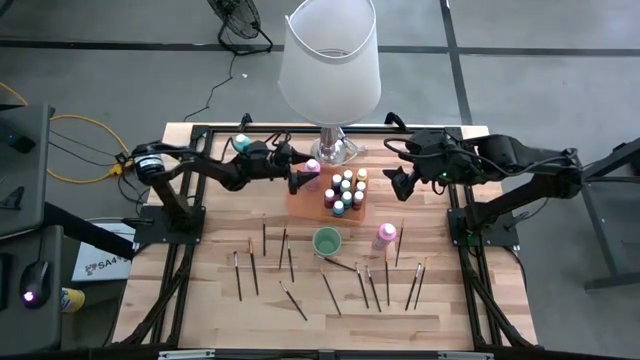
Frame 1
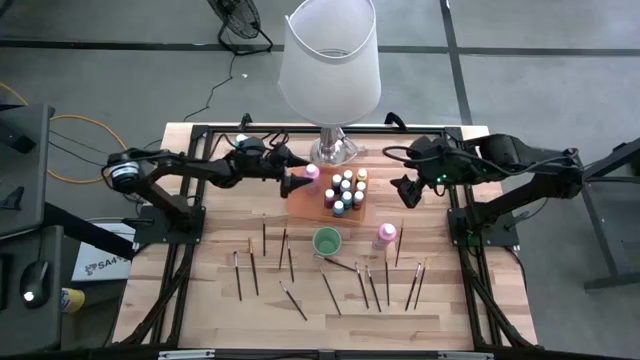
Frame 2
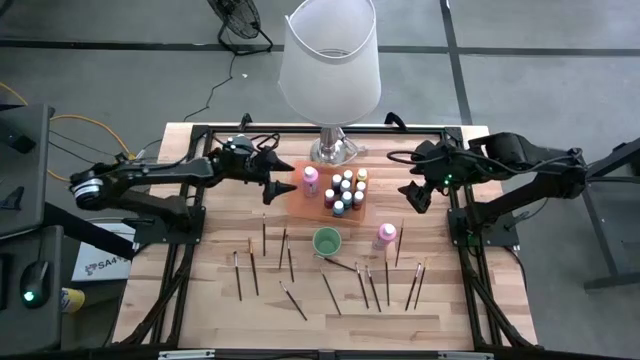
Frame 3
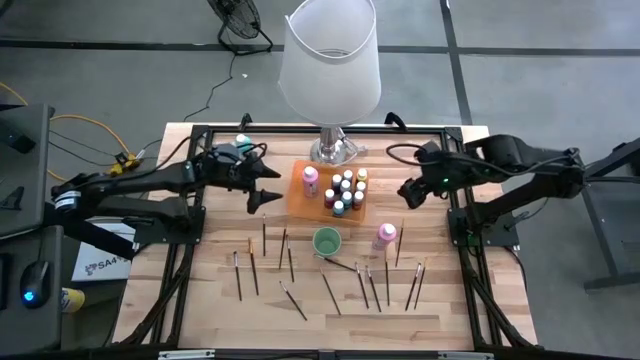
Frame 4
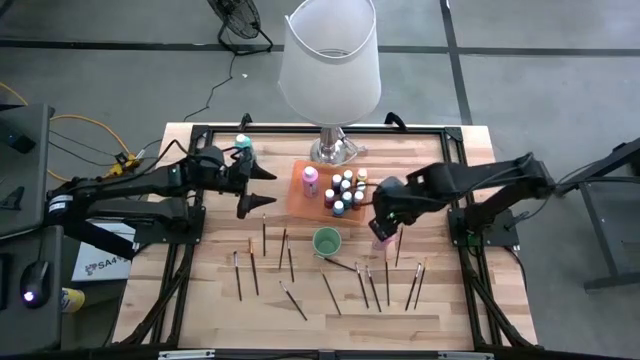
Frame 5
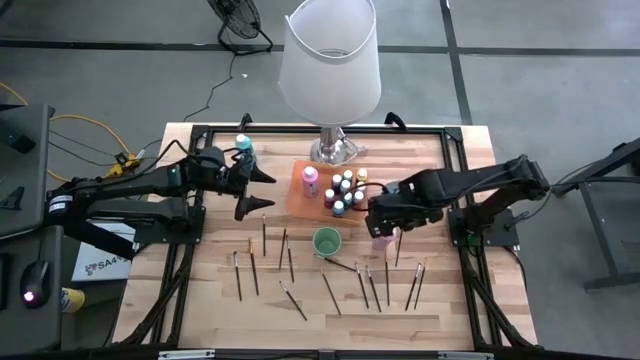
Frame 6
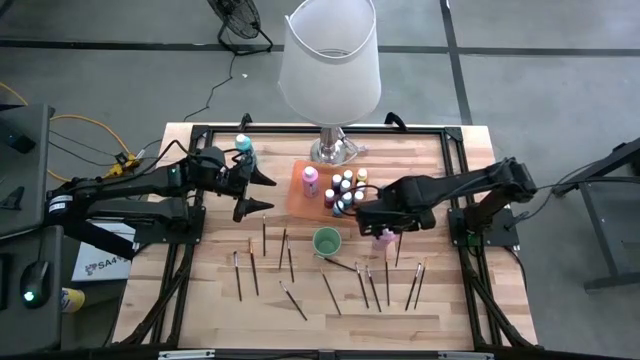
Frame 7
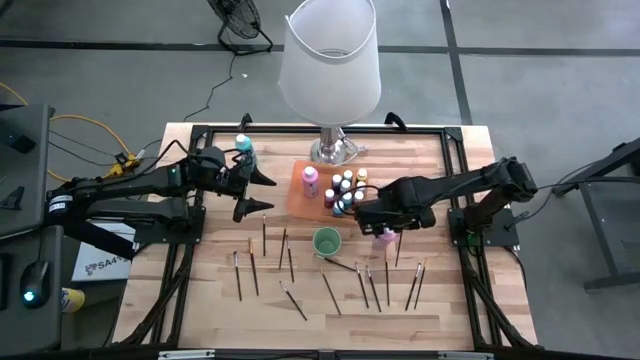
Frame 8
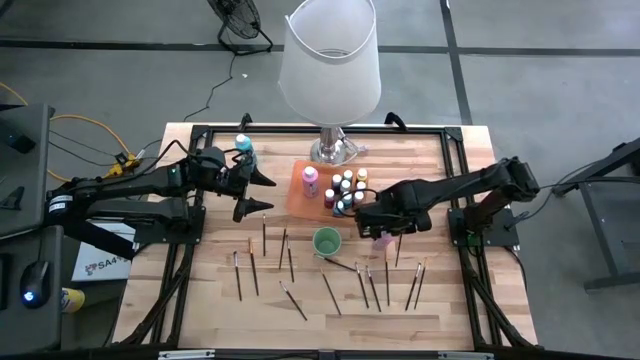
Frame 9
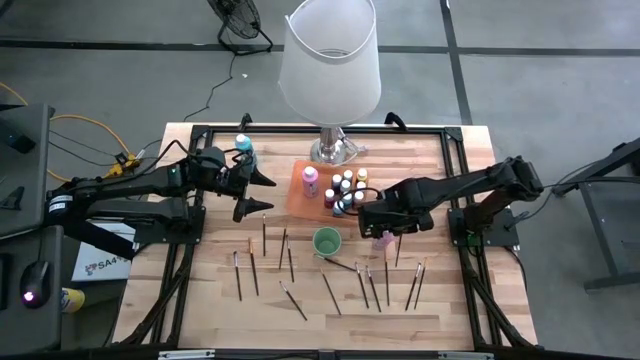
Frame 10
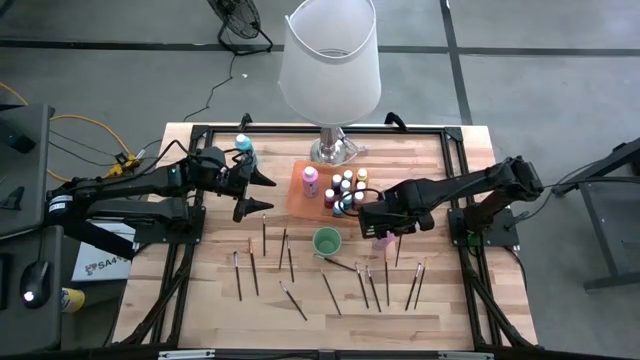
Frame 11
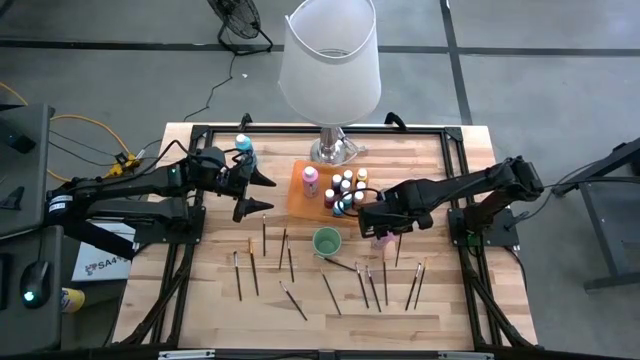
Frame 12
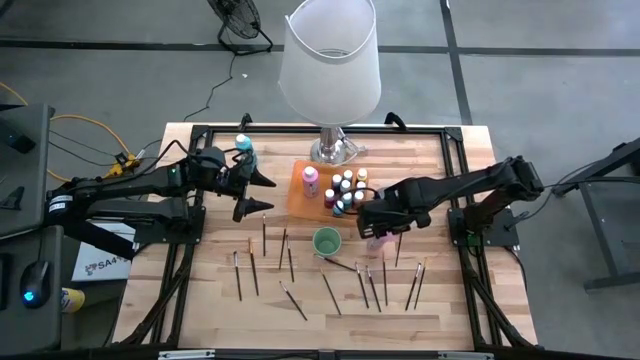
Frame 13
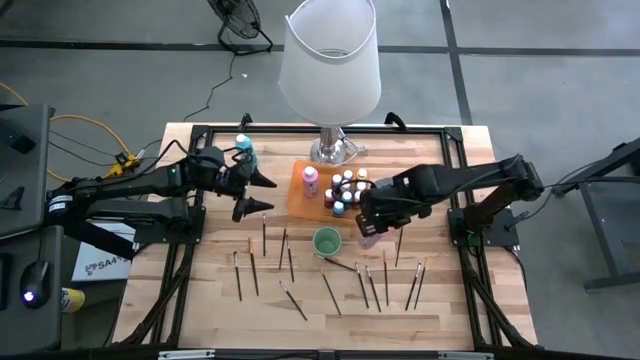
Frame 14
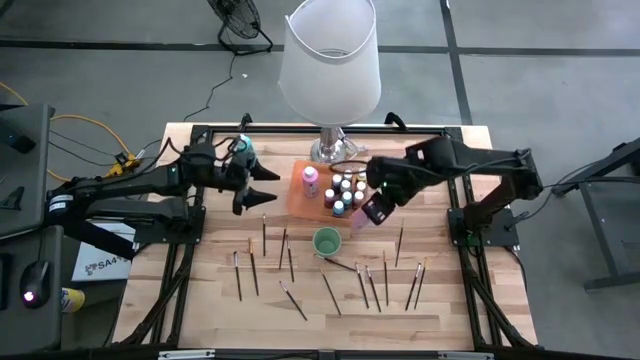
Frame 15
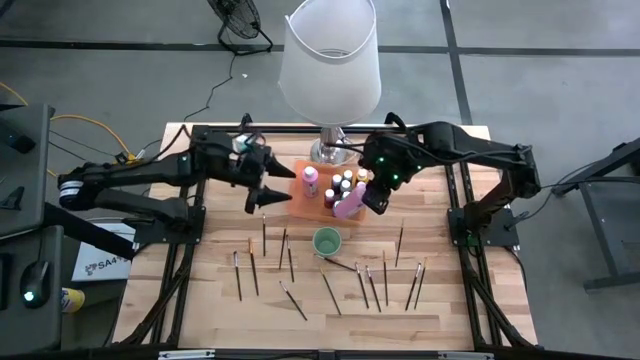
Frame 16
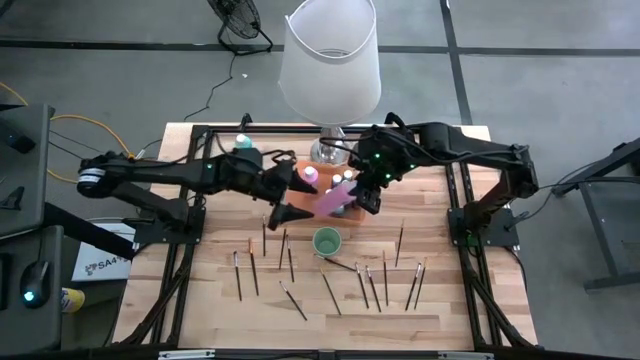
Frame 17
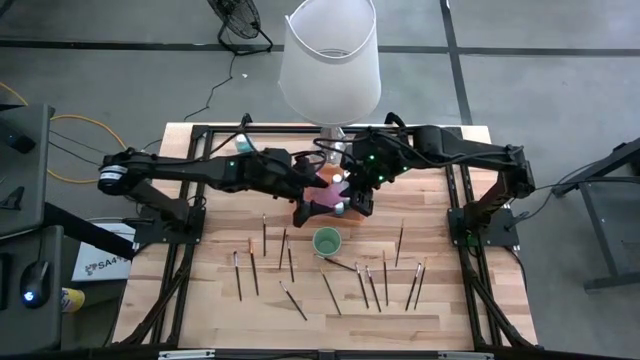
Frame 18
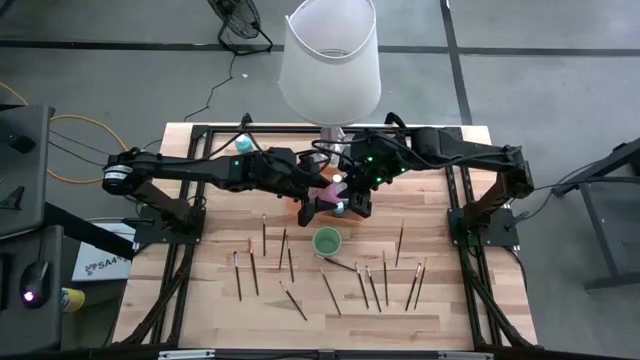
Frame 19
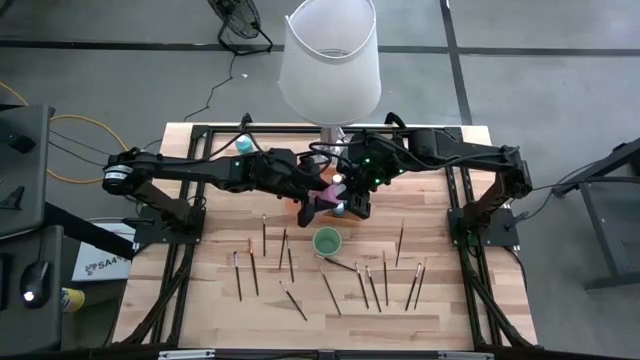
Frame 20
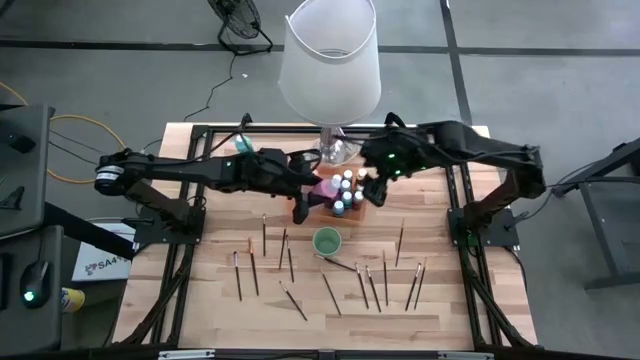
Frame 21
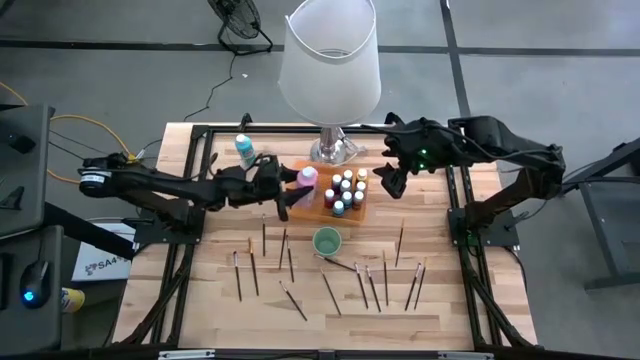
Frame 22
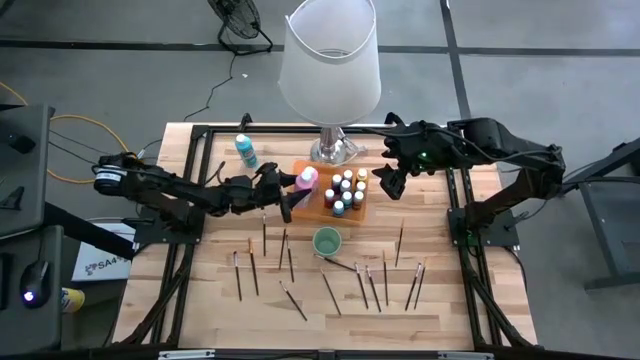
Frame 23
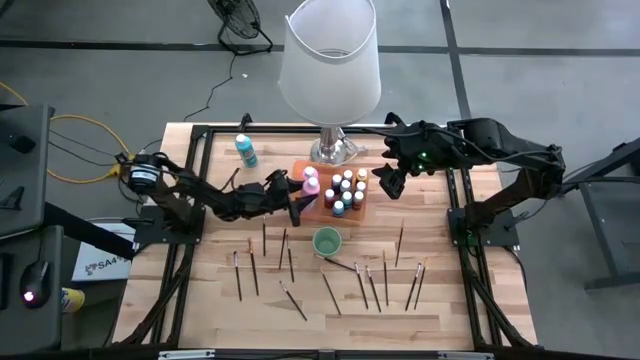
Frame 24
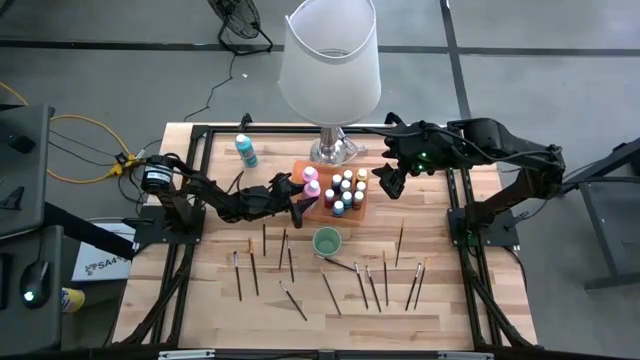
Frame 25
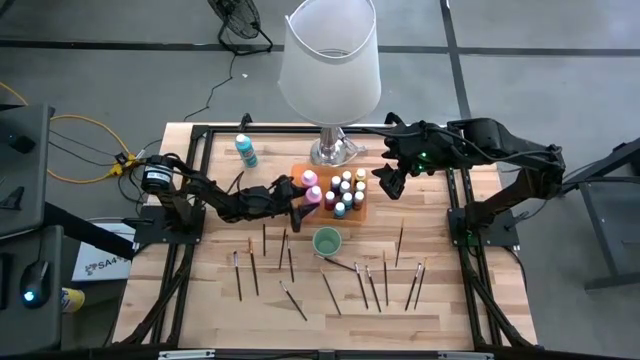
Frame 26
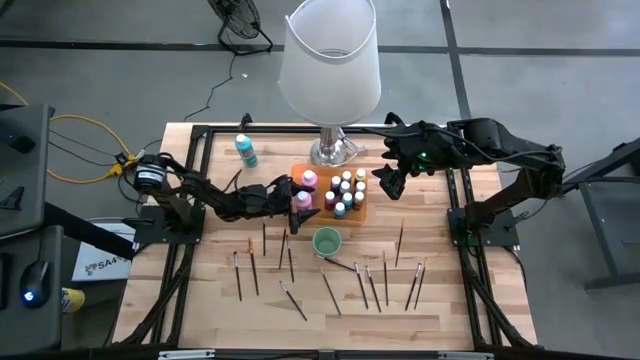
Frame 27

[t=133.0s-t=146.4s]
Task: Pick & Place Paint Supplies
Put the big pink paint bottle into the orange bin

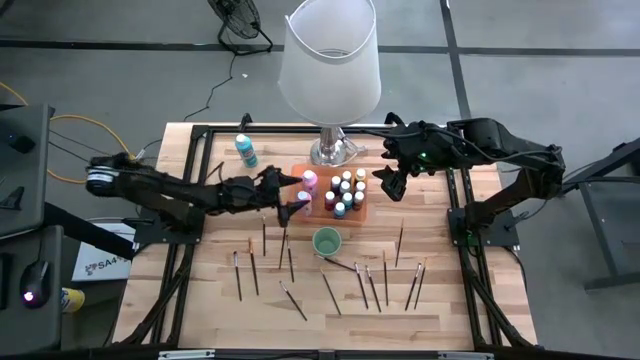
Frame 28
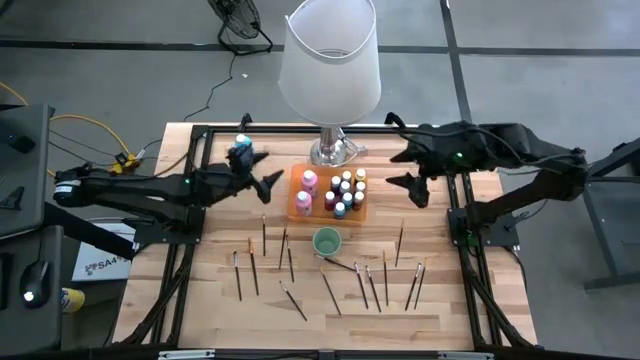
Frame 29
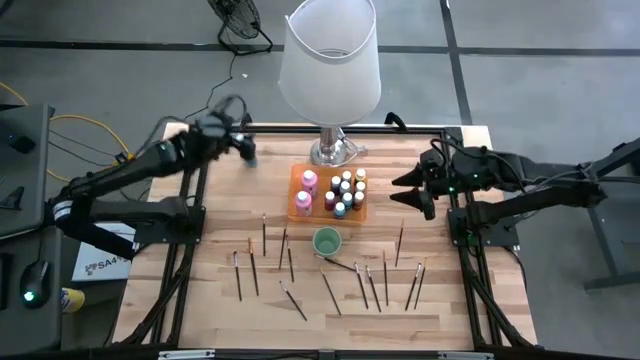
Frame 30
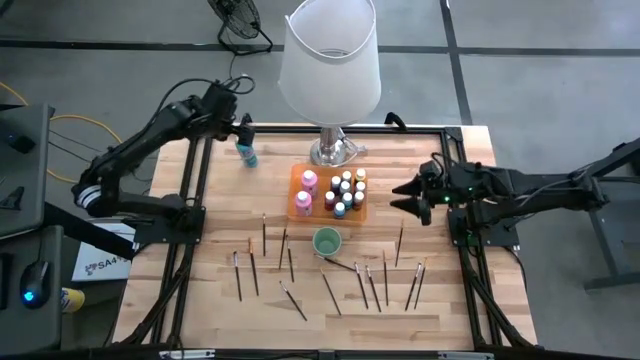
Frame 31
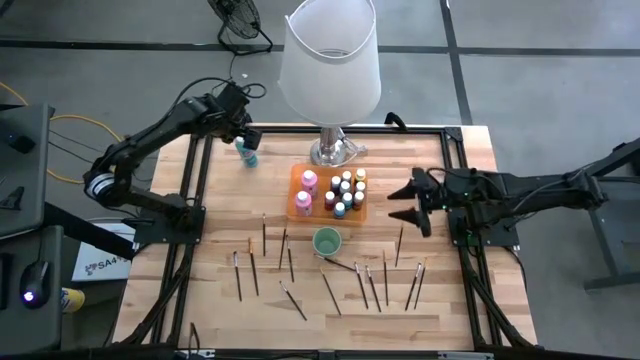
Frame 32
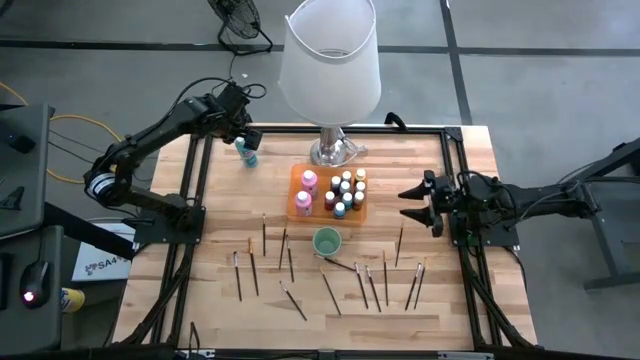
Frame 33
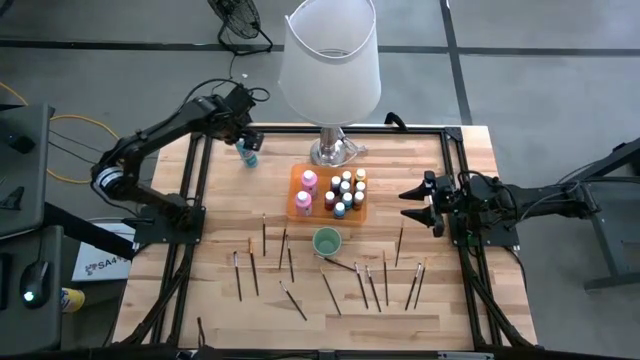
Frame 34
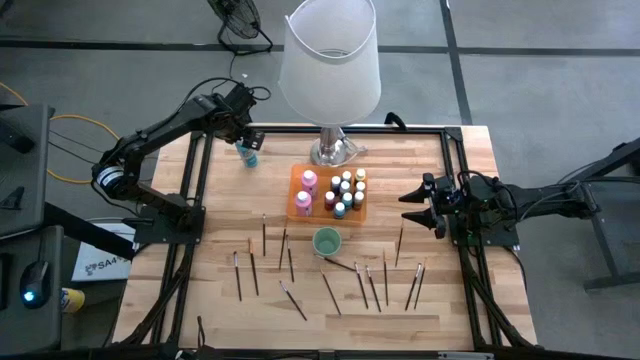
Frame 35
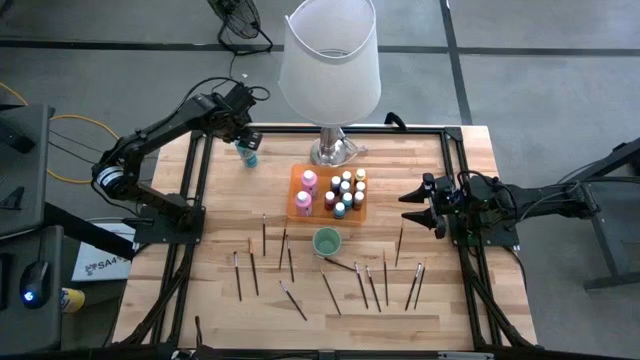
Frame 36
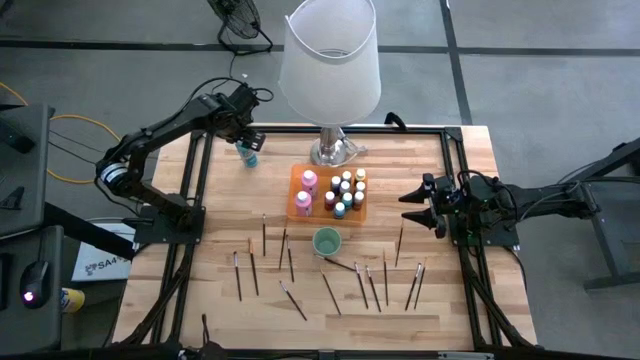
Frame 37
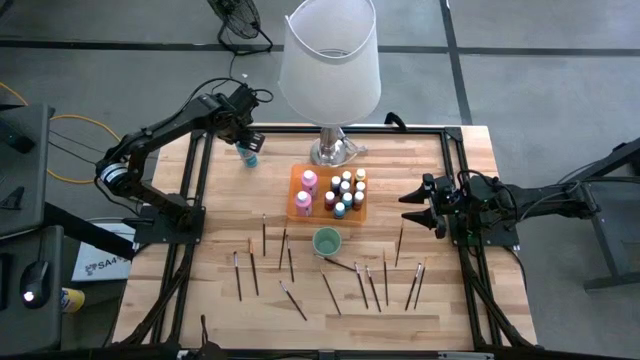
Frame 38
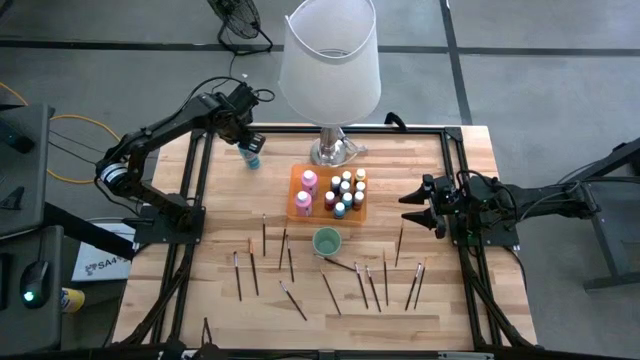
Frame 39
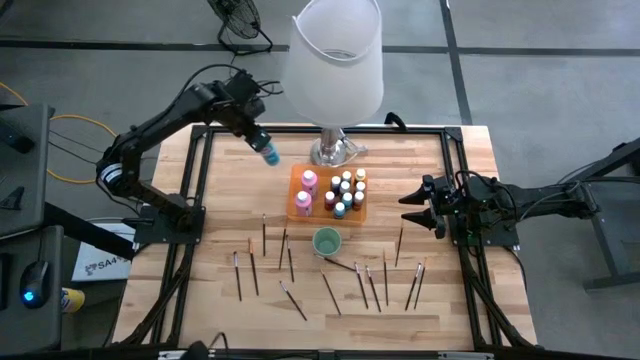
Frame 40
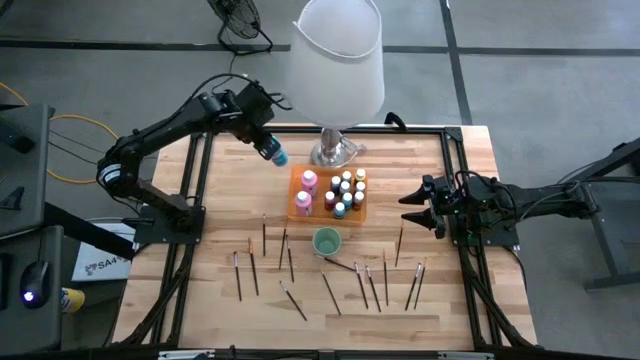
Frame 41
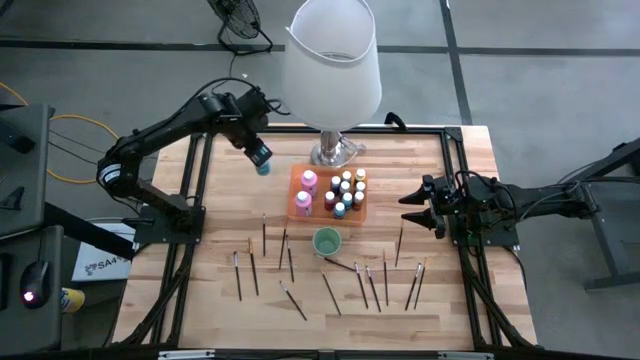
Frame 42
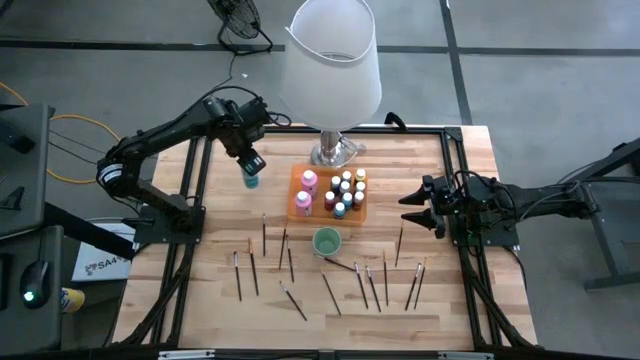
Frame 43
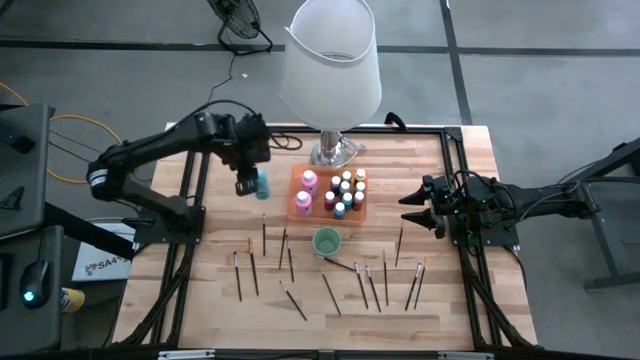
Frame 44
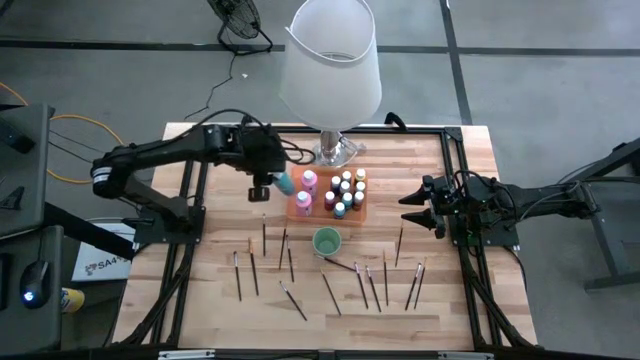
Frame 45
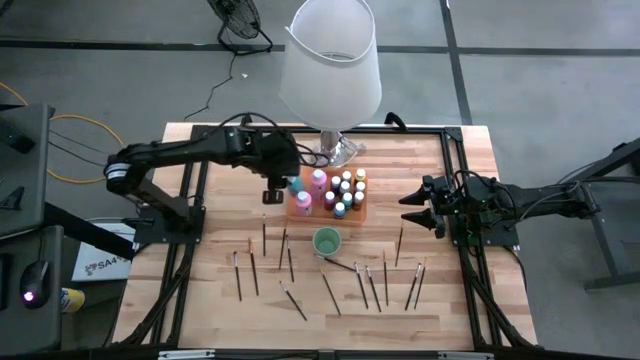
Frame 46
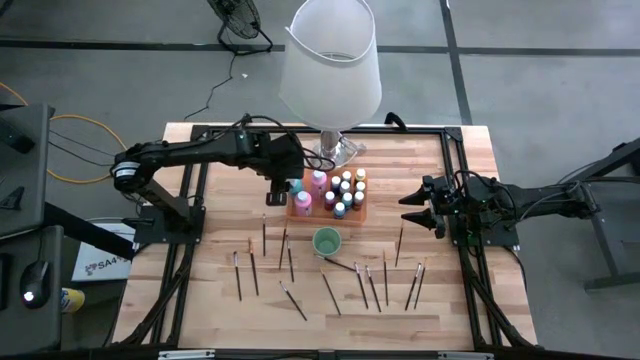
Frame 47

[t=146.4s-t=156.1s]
Put the big blue paint bottle into the orange bin
